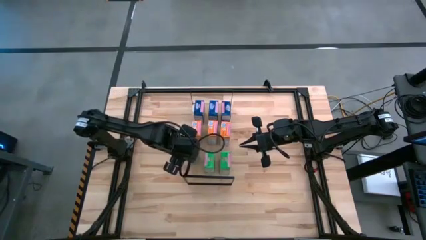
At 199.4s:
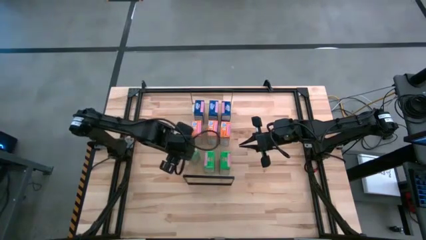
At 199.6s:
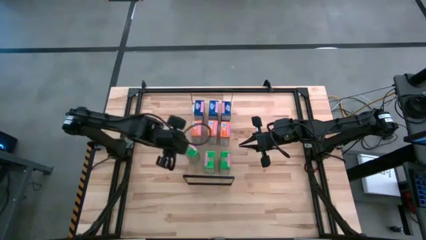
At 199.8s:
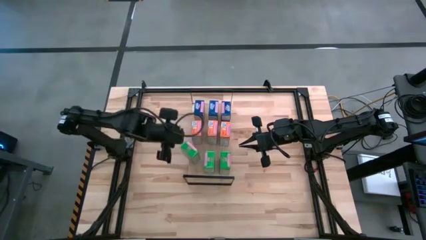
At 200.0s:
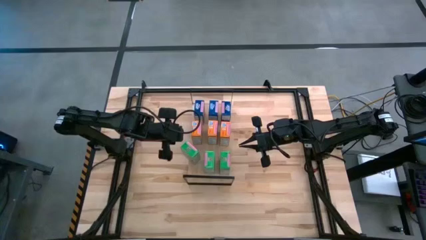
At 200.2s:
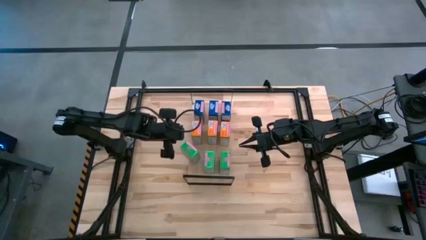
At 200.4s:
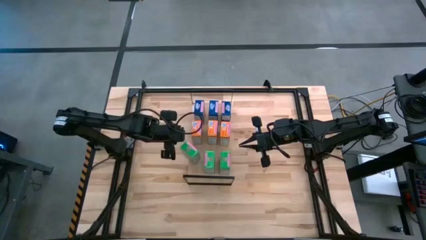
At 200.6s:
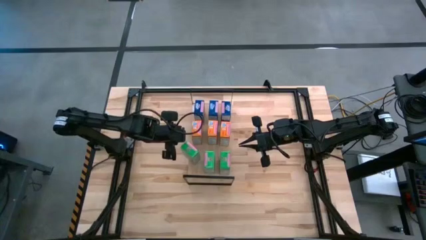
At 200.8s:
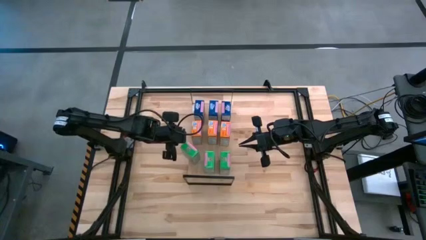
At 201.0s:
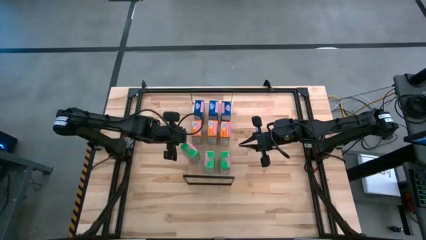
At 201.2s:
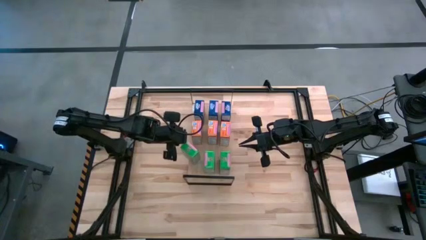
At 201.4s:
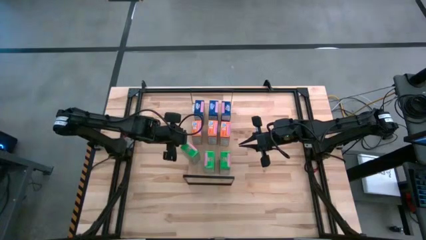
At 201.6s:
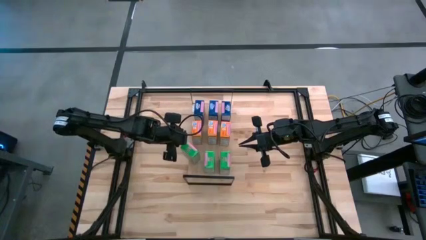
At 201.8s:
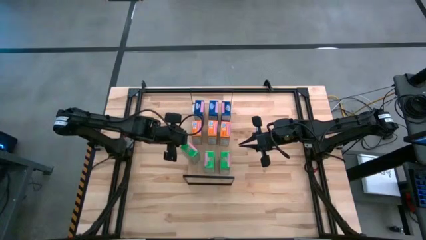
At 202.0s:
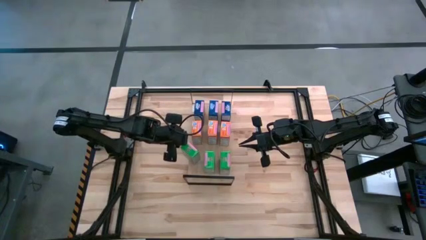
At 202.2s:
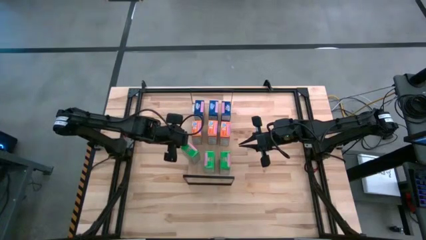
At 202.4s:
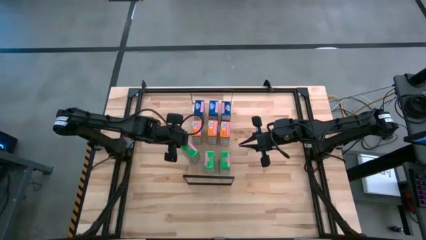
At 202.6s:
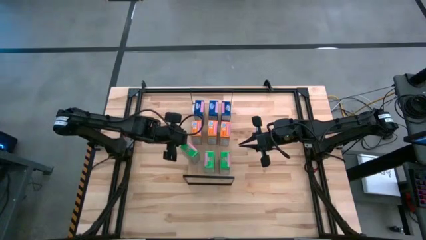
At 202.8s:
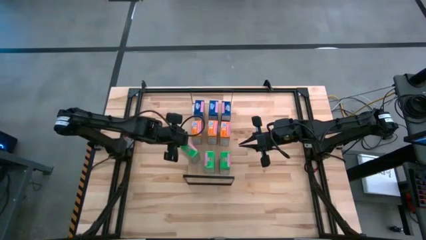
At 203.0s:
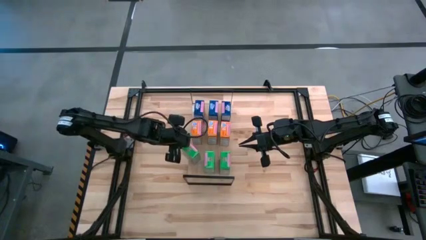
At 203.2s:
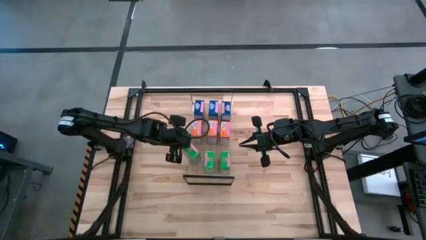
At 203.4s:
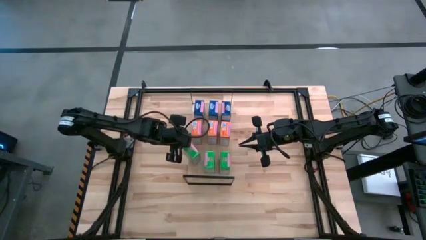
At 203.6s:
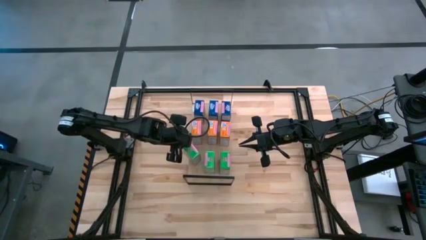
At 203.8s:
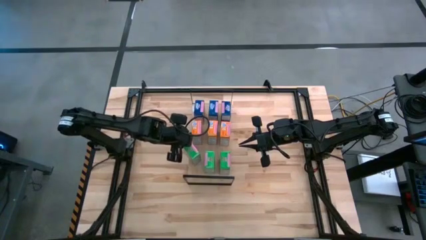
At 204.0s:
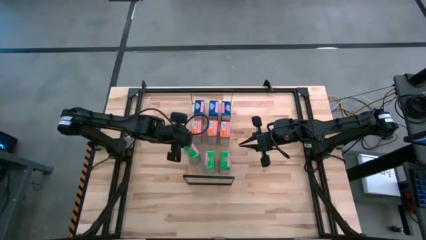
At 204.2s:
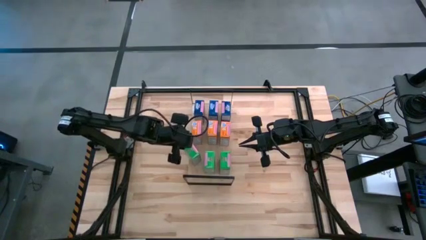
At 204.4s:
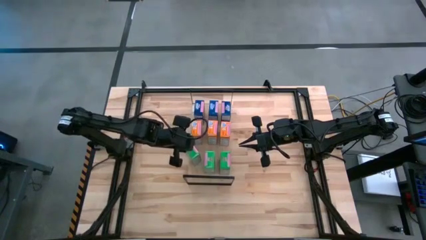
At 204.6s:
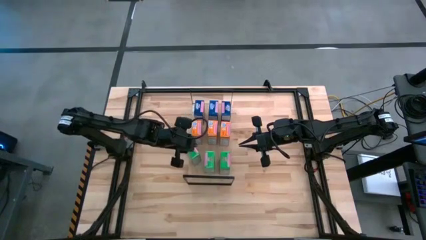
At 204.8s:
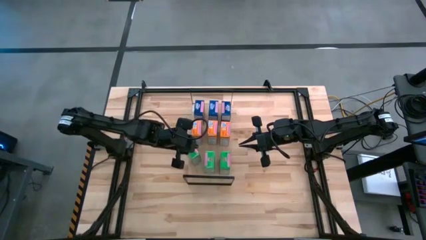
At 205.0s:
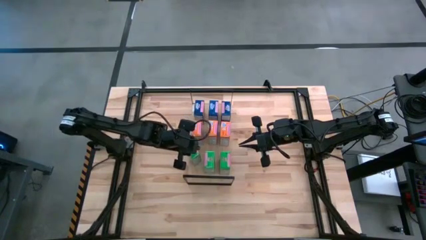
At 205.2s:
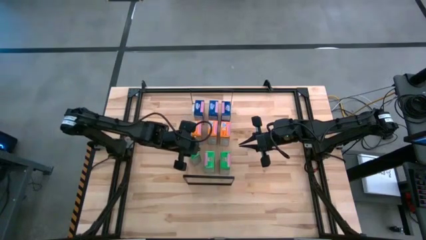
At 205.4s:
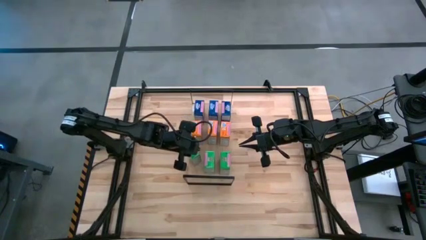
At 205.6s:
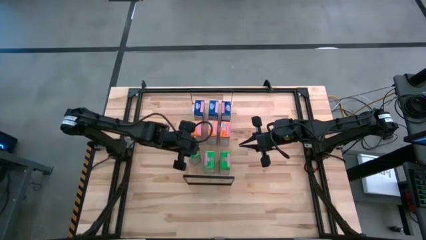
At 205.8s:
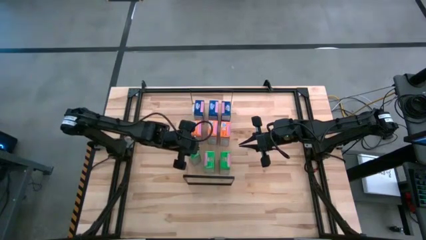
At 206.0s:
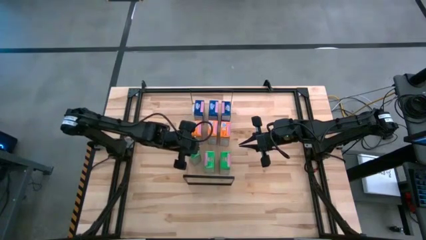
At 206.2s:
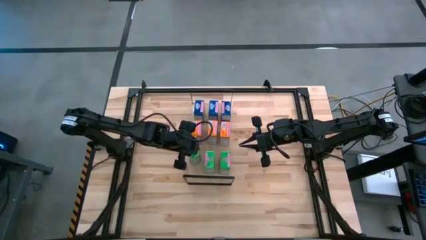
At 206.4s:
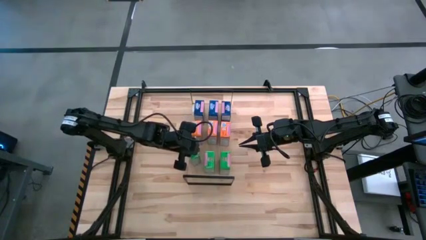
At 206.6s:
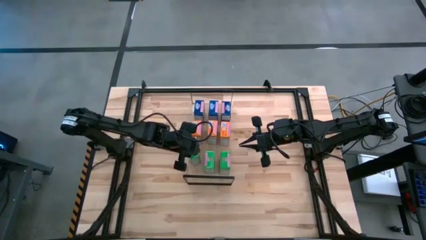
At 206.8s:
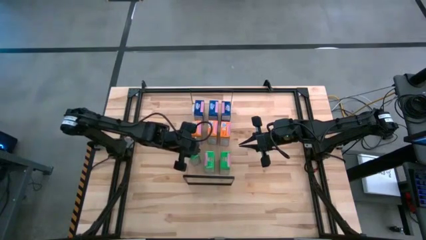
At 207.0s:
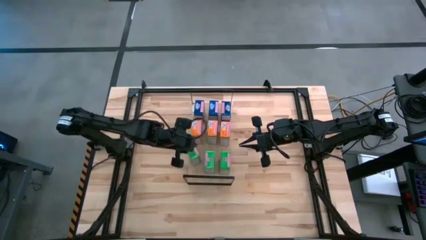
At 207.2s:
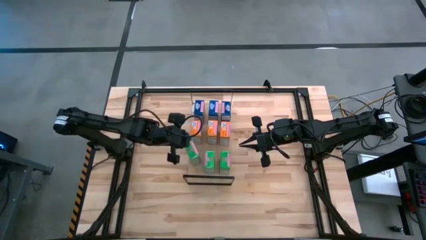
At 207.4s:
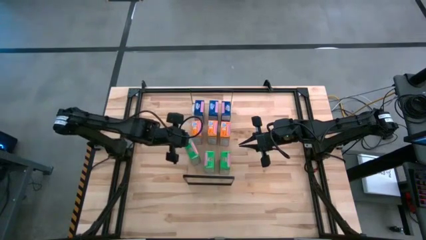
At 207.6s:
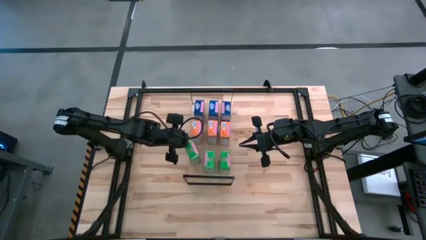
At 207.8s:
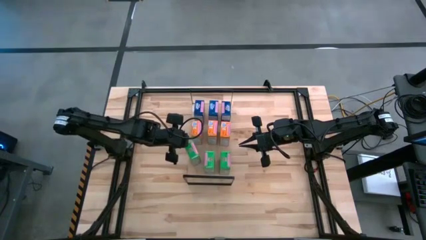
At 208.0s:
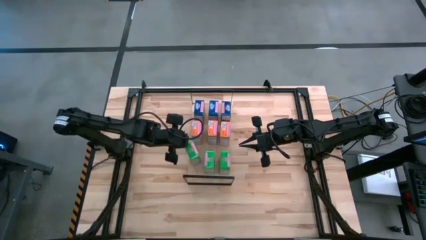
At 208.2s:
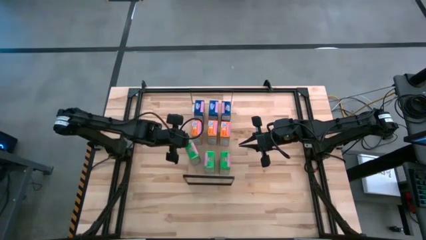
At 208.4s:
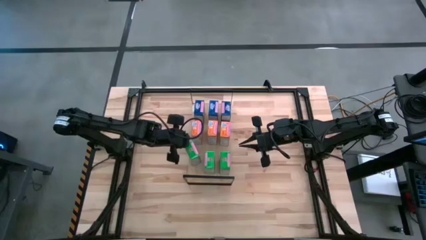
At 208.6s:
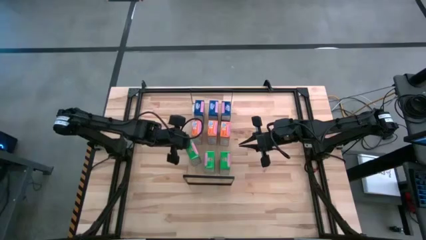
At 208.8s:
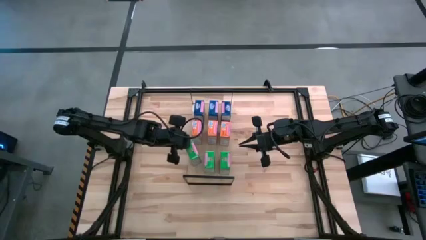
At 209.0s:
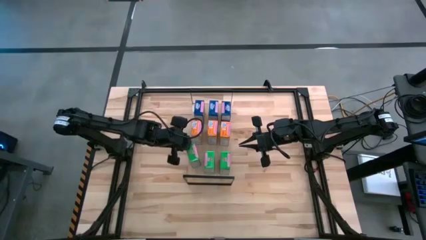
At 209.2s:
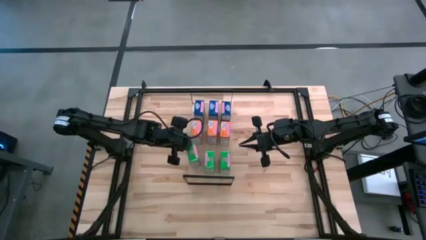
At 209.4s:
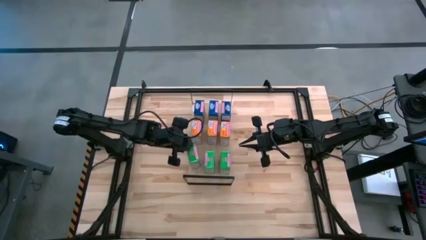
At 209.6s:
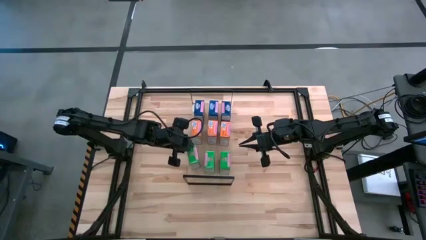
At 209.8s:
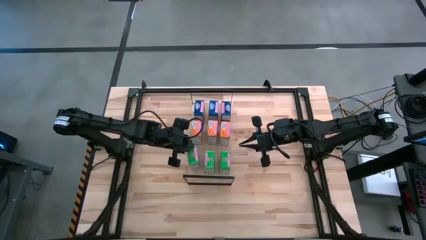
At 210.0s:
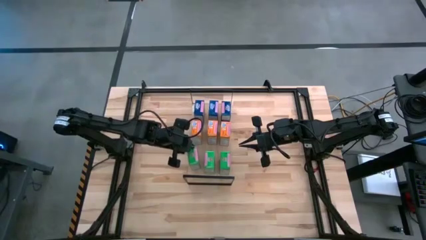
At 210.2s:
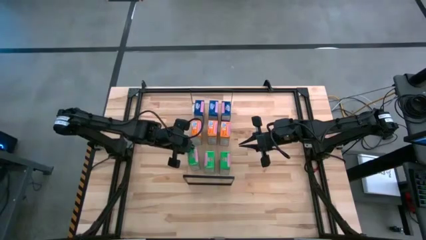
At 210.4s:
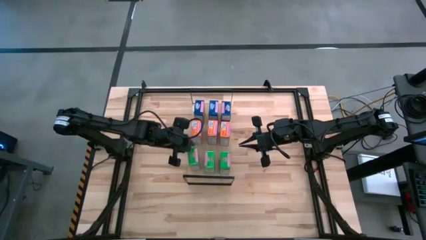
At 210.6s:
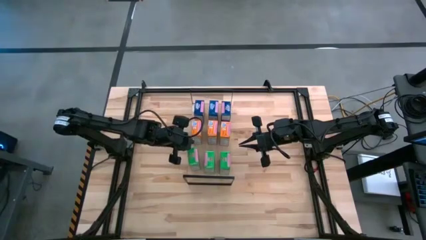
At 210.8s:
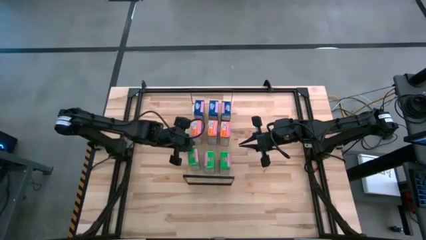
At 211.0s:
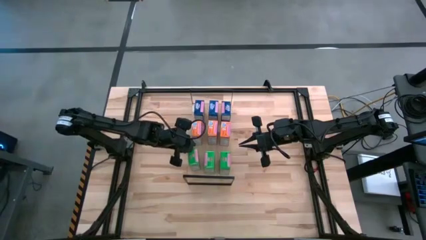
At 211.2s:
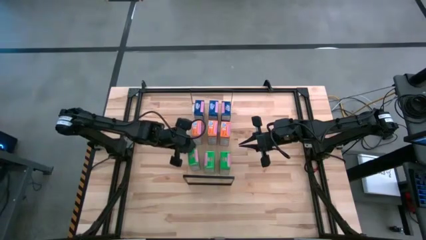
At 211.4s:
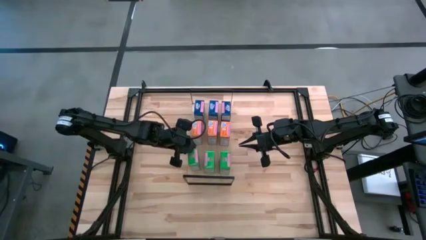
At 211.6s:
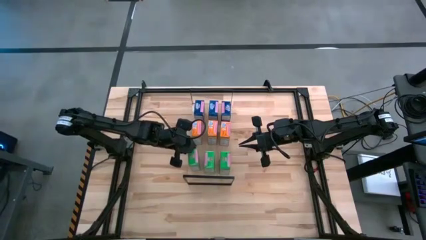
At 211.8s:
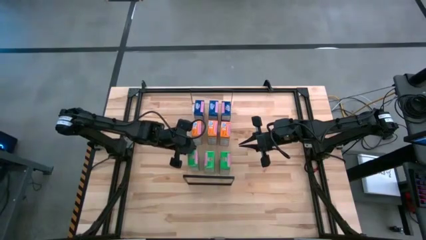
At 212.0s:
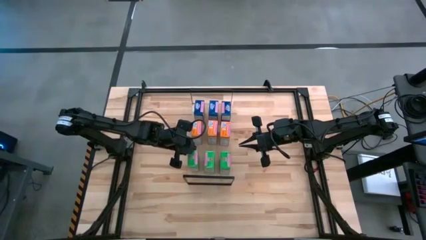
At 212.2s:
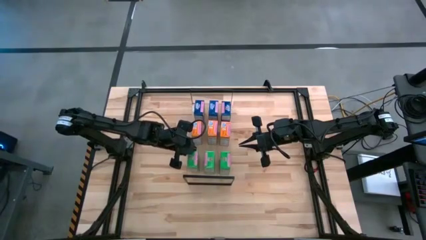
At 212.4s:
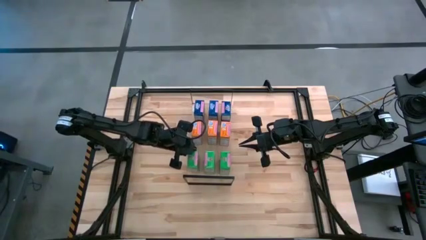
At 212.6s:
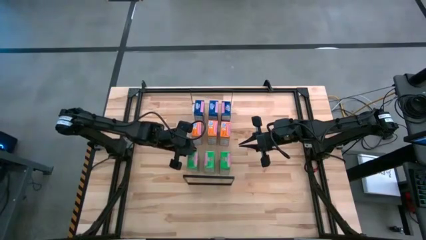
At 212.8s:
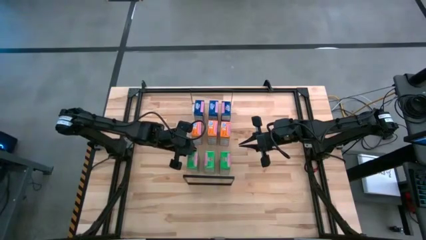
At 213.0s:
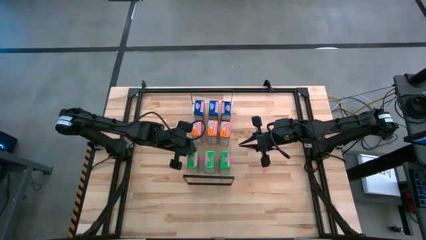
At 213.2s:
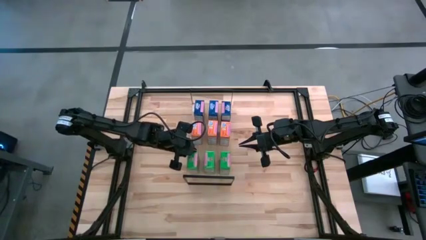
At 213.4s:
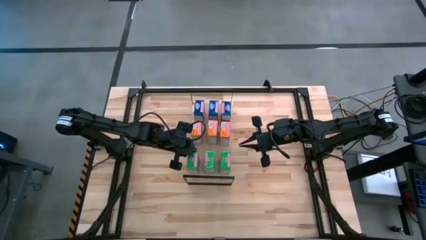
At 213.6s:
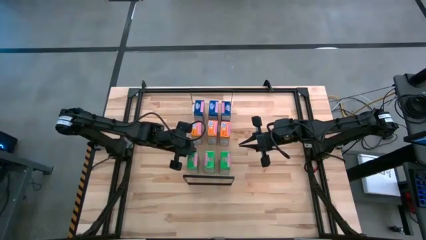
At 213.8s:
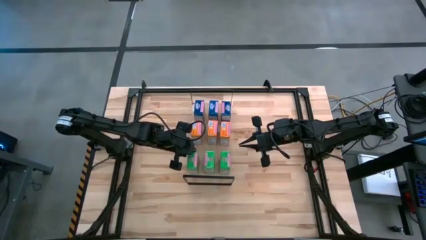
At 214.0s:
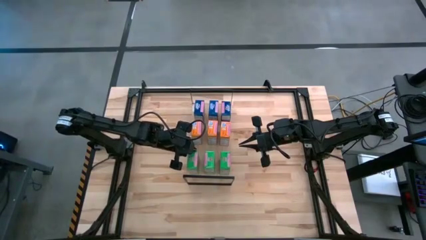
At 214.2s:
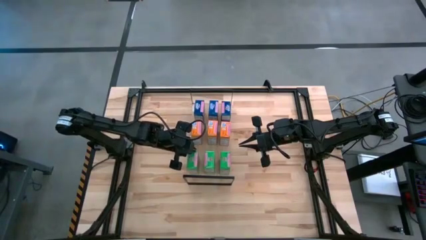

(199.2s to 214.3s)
Task: Stack cereal on shelf
Put the green cereal box on the shelf aligned with the other green cereal boxes

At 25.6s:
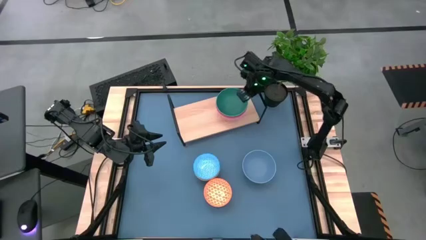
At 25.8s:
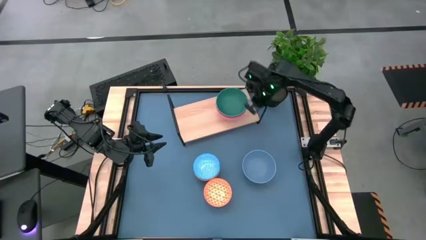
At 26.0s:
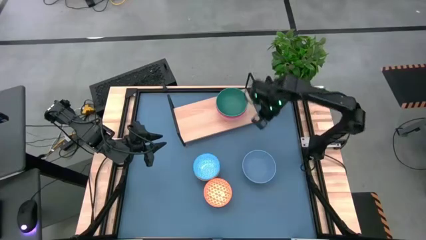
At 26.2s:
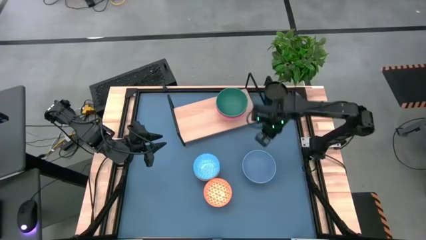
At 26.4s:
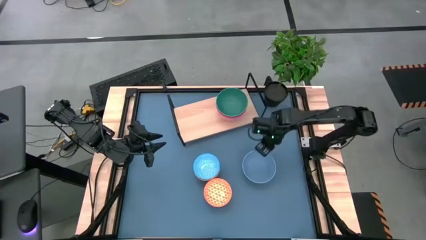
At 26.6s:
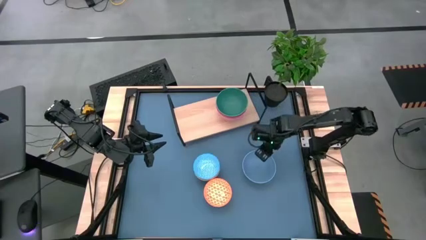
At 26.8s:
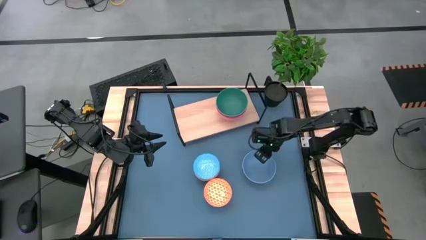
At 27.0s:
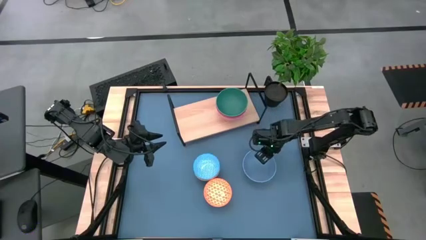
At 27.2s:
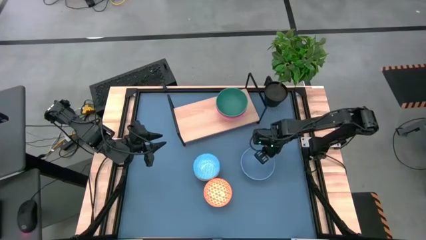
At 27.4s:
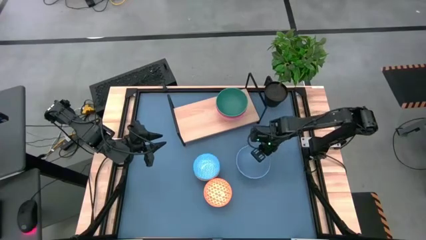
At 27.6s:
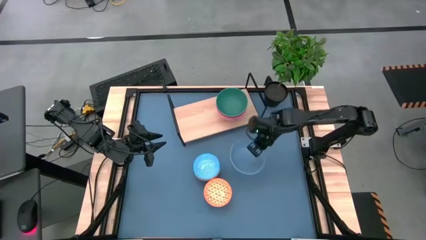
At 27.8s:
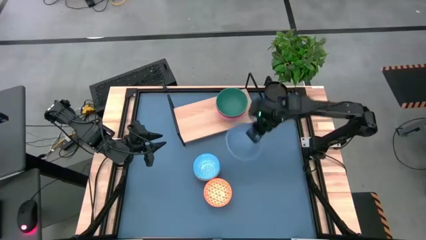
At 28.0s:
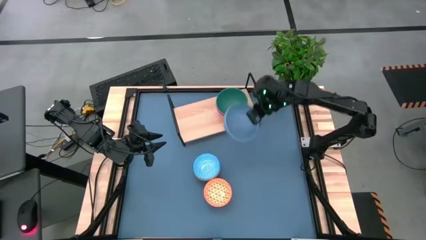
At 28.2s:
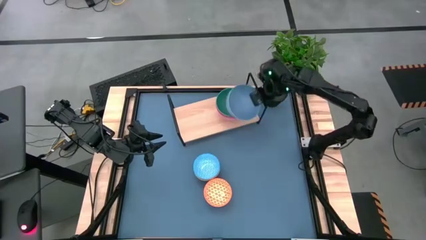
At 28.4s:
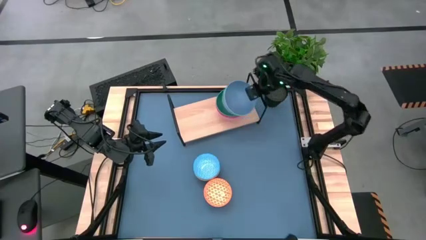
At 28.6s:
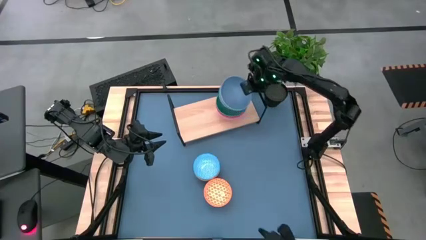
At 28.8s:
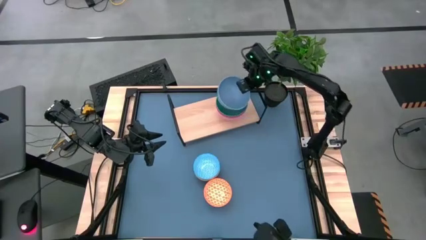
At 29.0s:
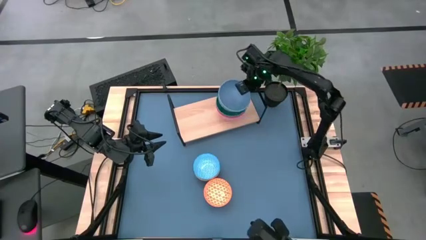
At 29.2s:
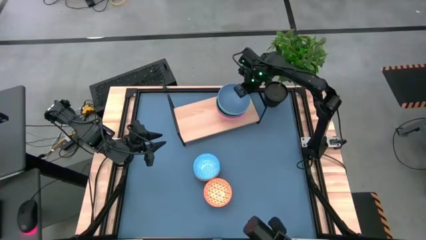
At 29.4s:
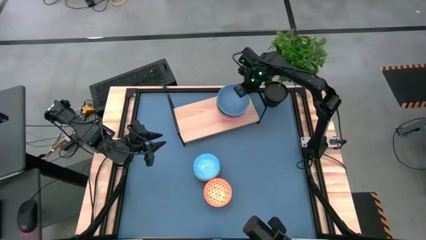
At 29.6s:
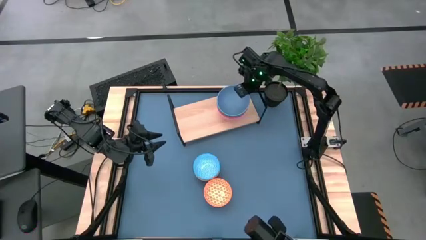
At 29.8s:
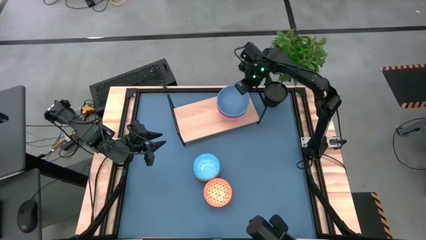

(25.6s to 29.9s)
Task: Place and stack bowls onto a shelf
Stack the blue bowl on top of the green bowl on the shelf
